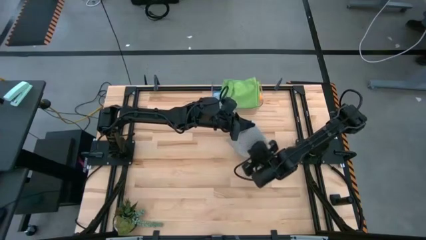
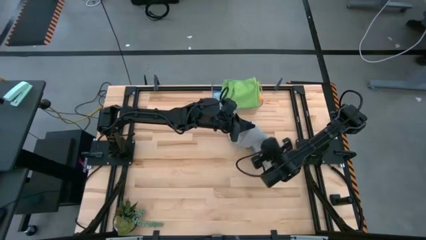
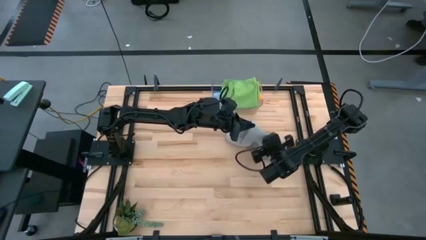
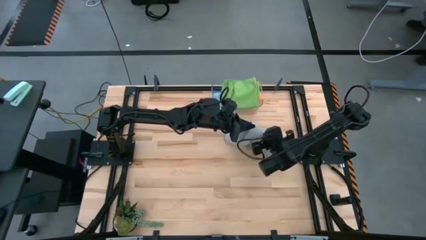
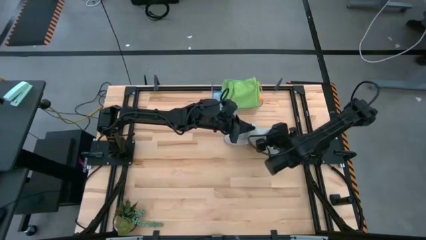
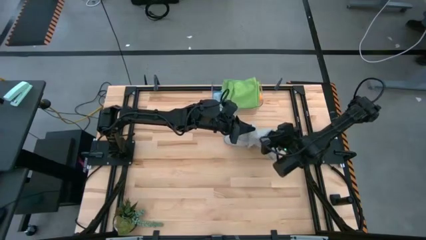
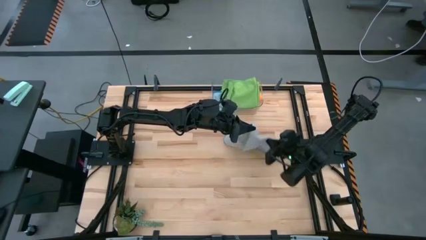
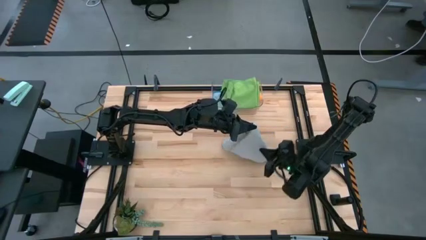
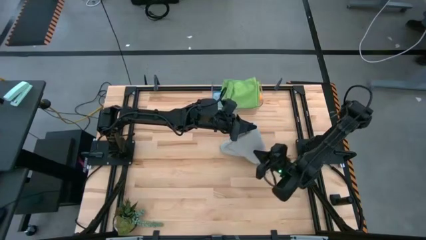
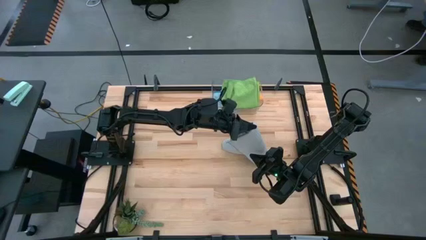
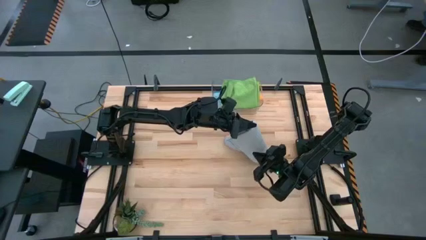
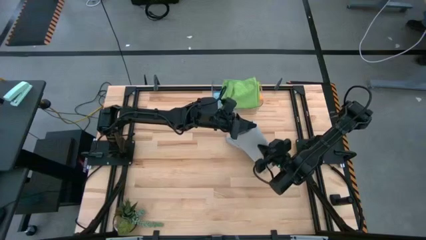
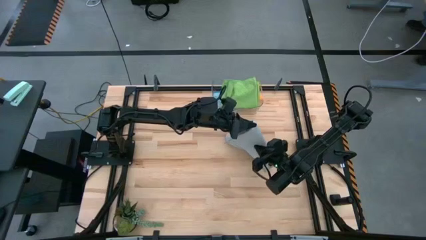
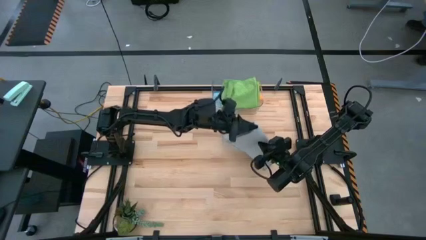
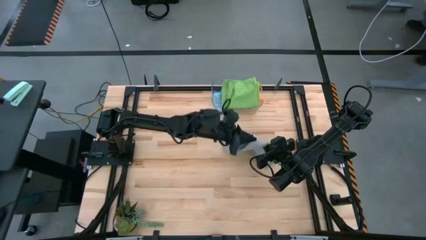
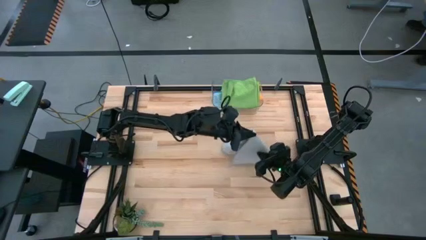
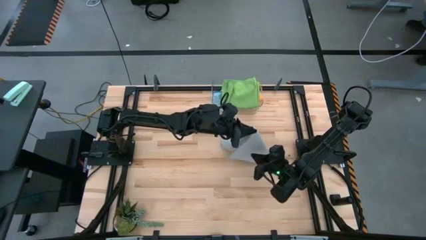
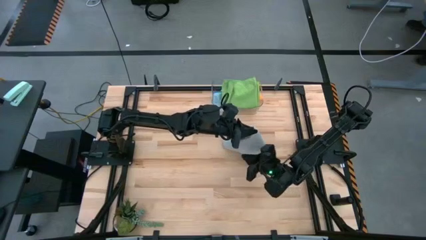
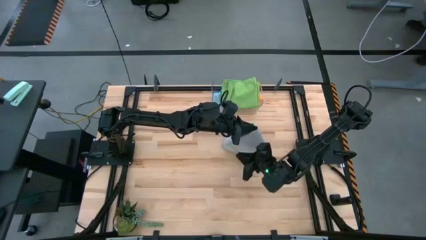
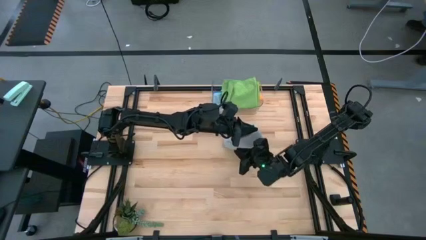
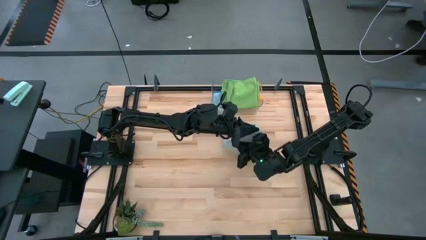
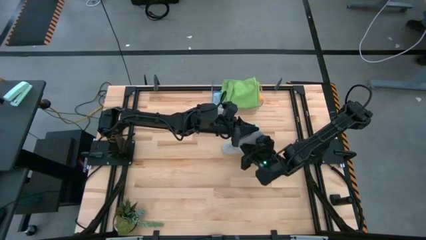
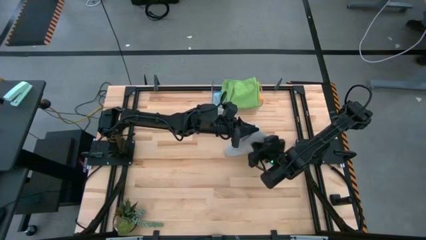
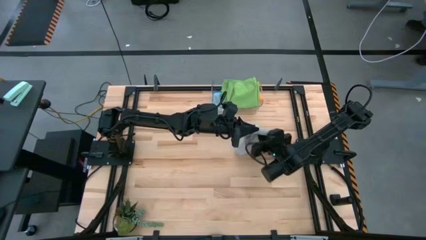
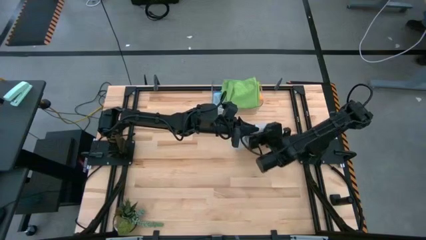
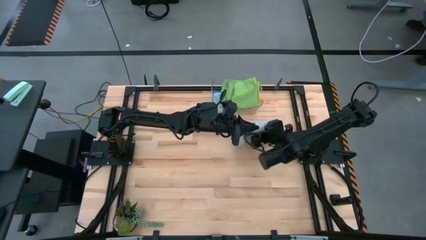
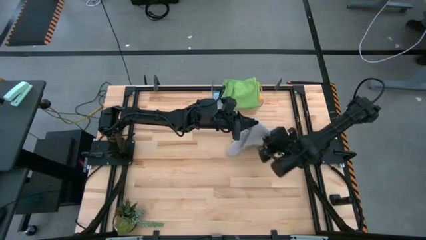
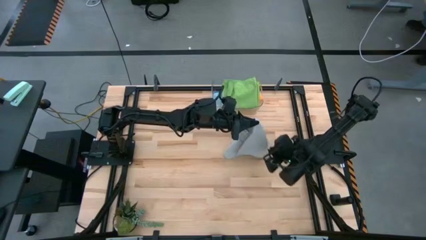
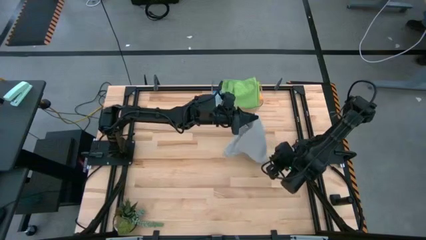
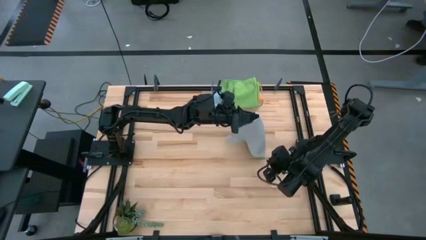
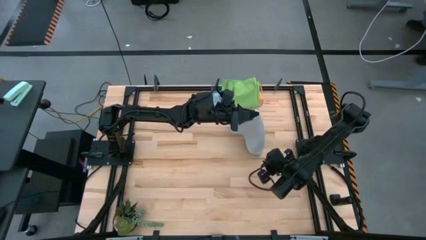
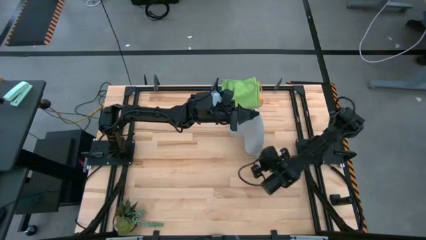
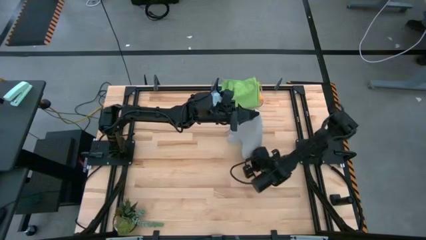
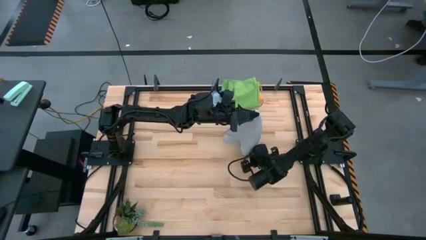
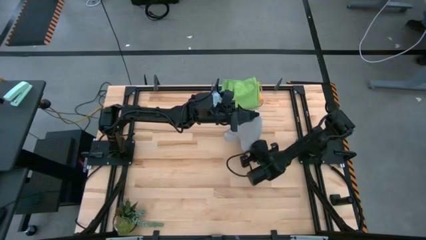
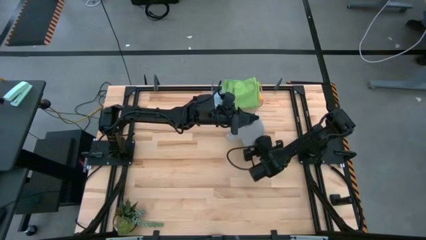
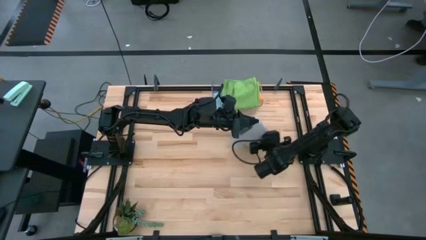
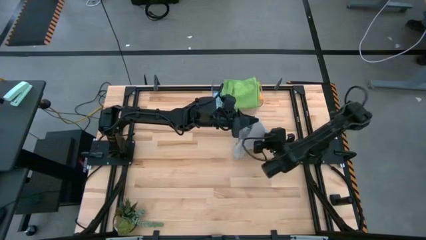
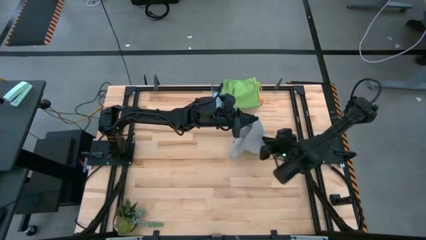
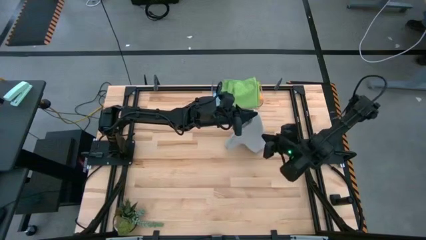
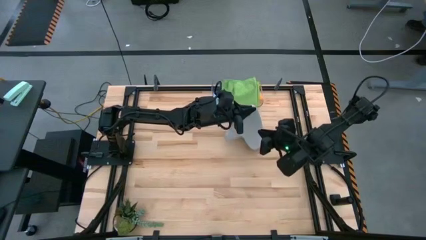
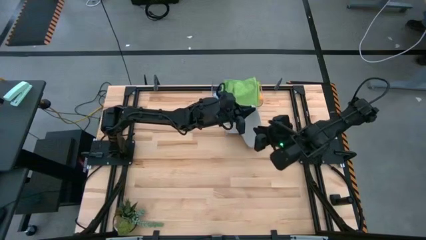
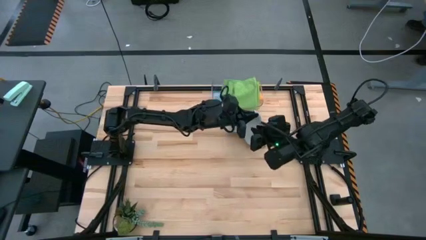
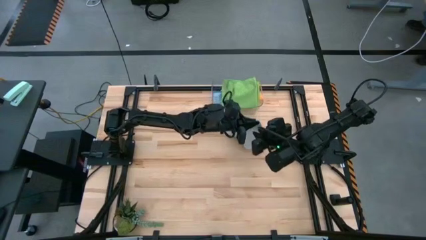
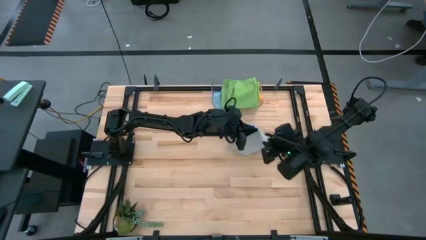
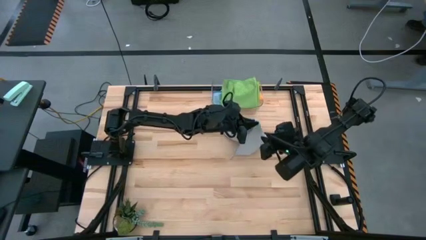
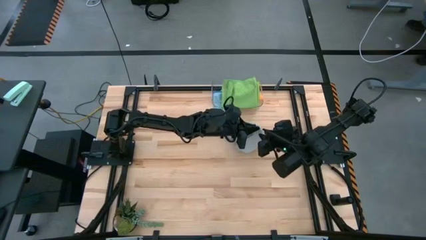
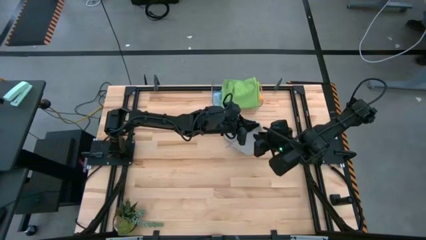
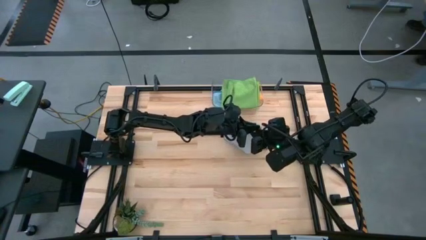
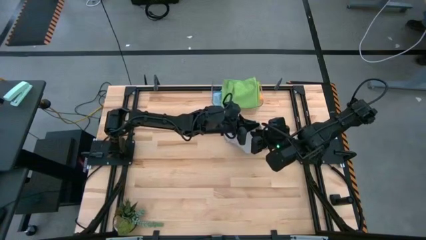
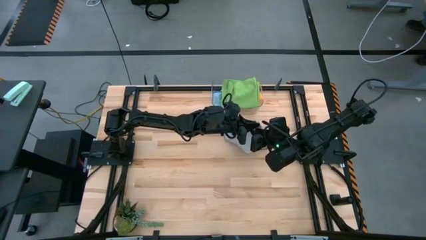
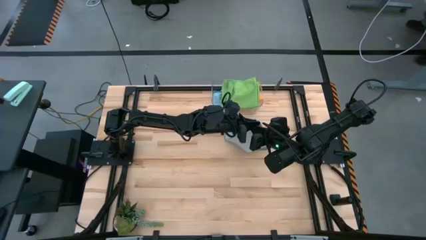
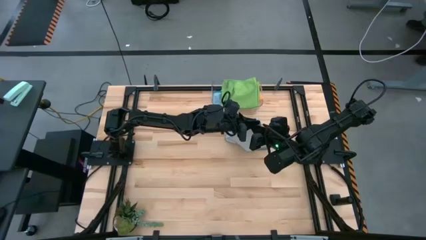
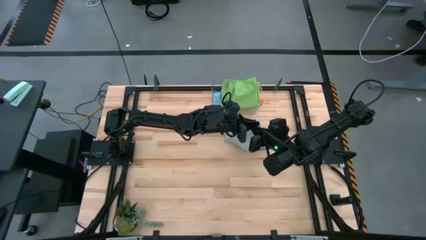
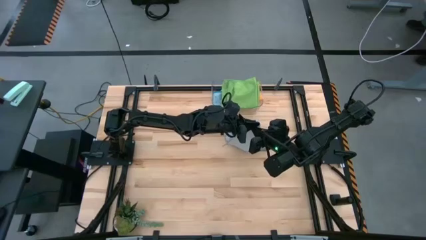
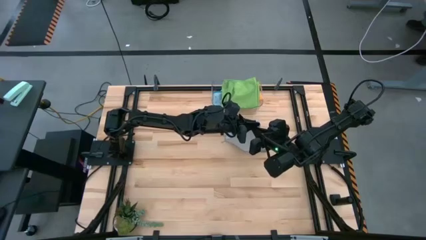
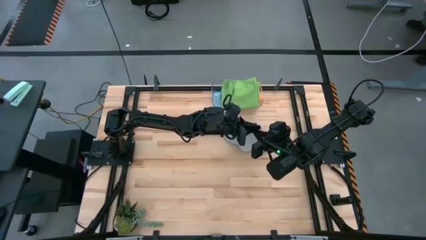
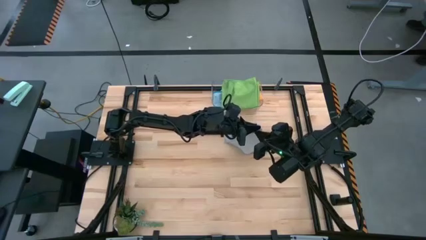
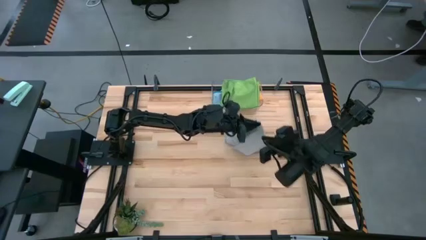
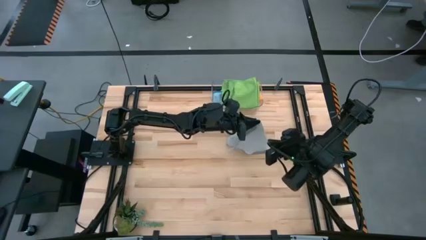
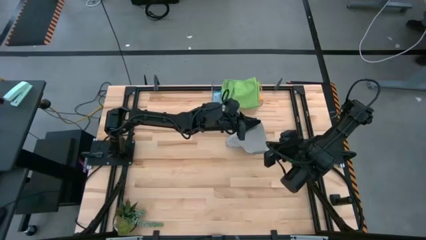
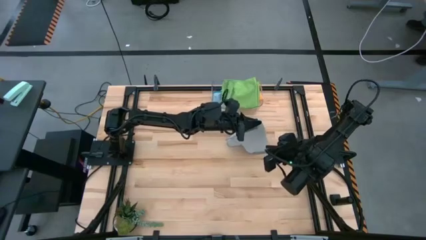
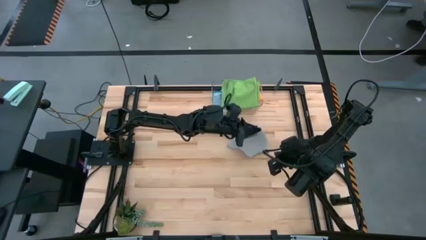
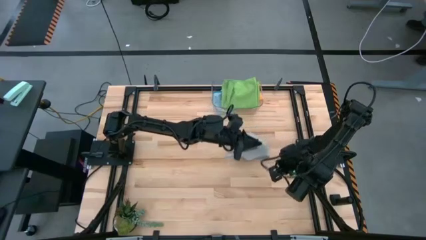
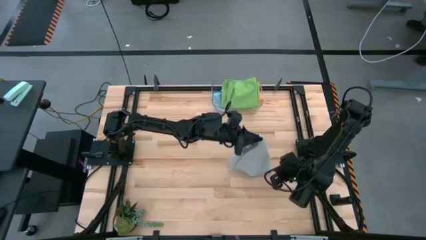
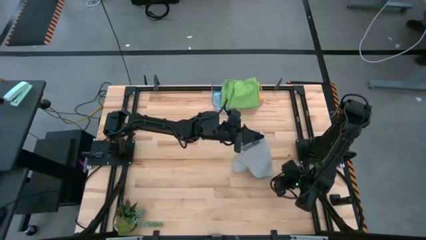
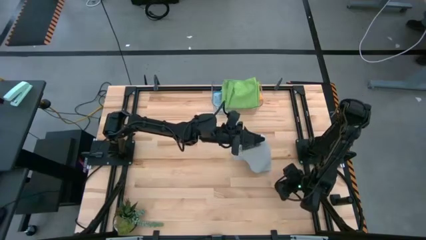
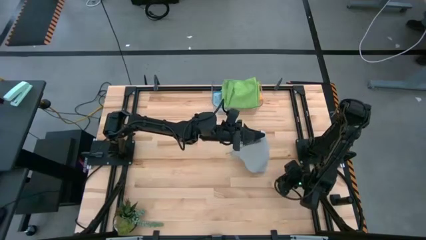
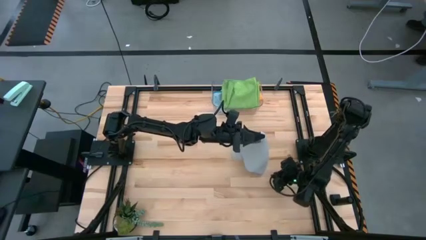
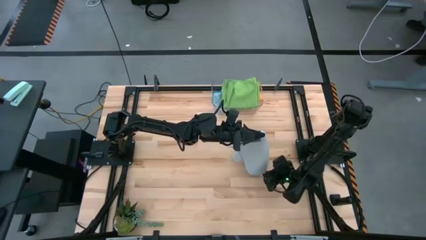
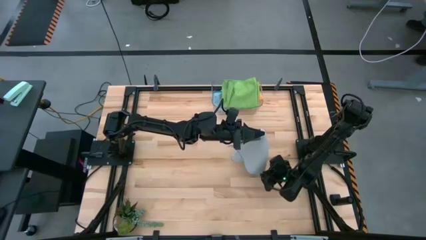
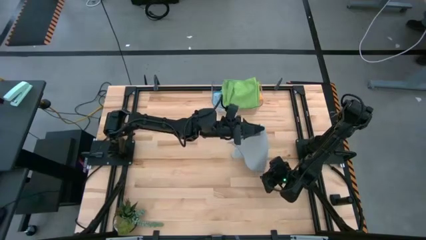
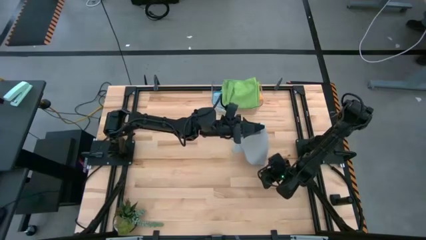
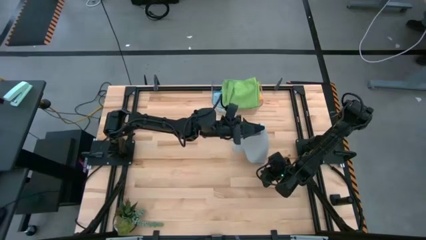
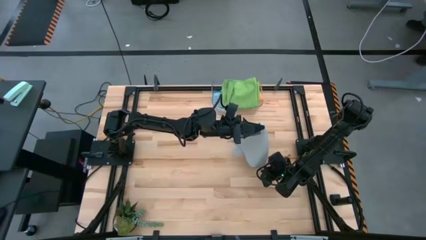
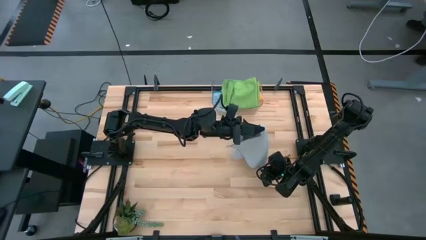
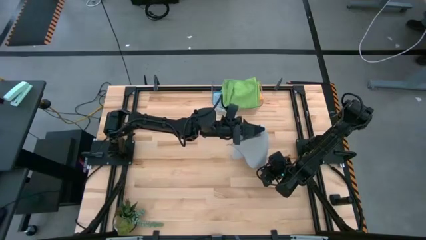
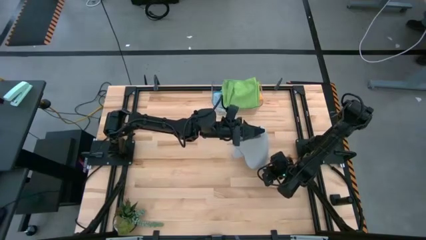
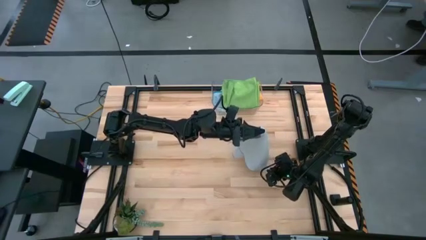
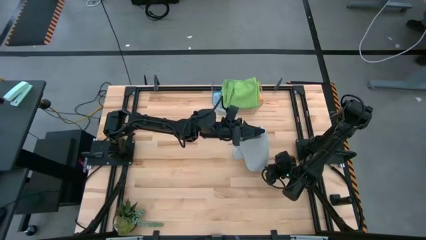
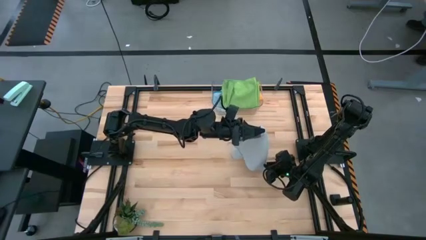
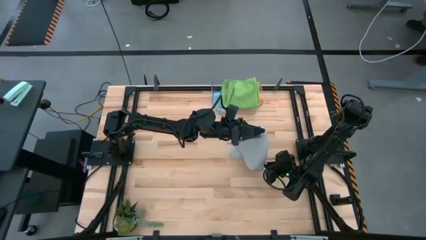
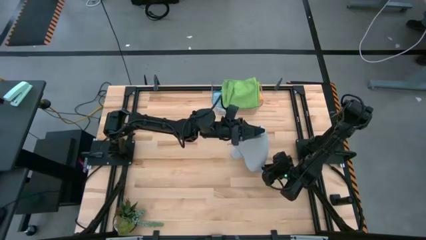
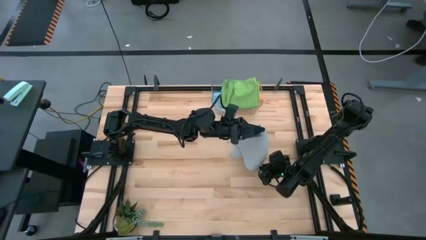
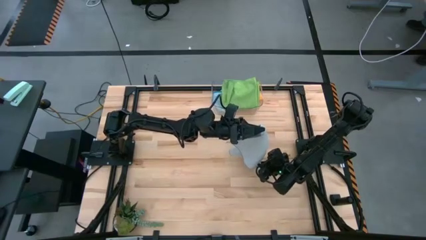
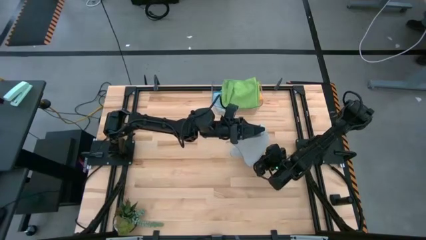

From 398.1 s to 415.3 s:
Task: Fold microfiber towels
Fold the gray microfiber cloth
